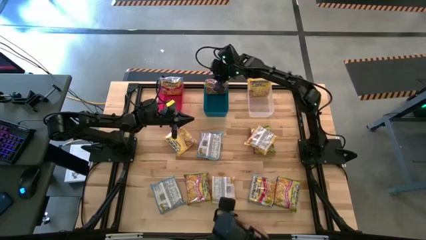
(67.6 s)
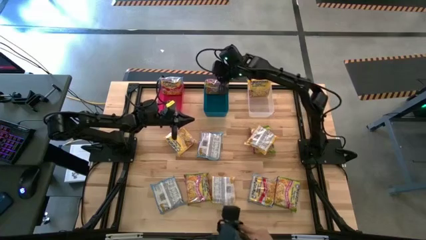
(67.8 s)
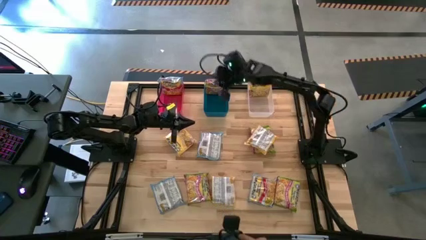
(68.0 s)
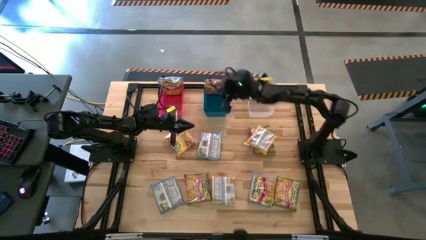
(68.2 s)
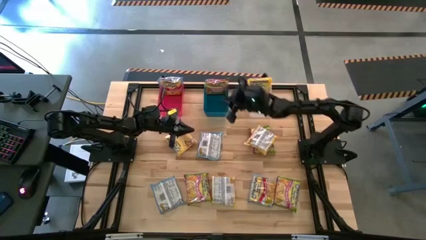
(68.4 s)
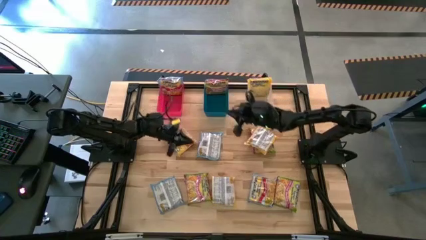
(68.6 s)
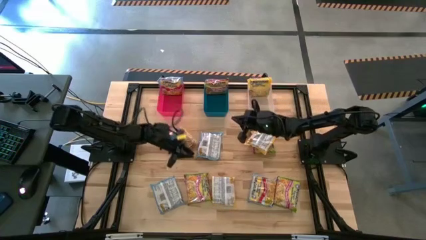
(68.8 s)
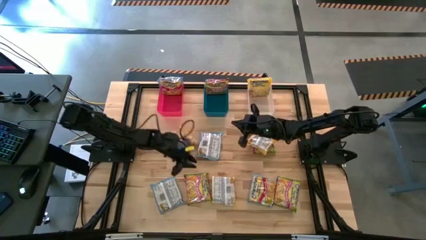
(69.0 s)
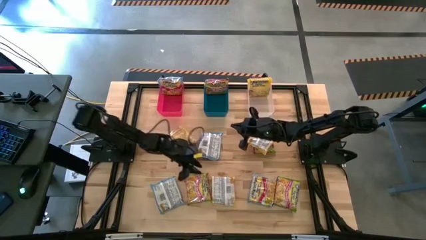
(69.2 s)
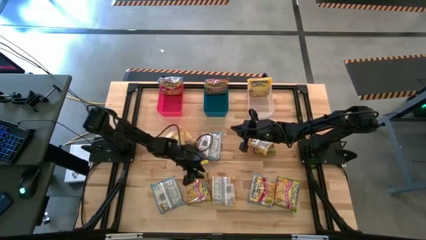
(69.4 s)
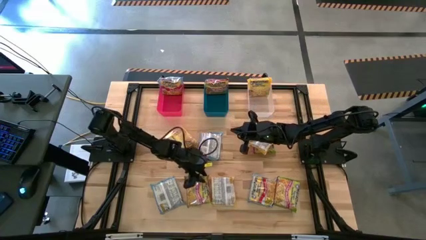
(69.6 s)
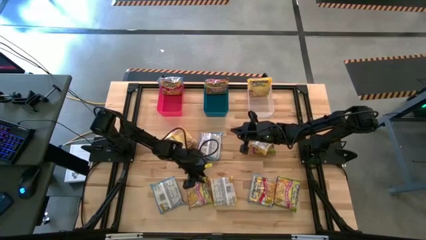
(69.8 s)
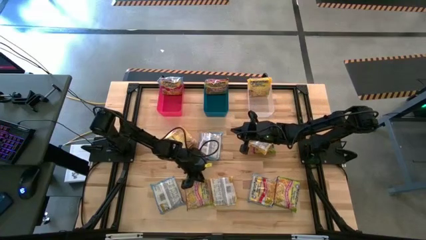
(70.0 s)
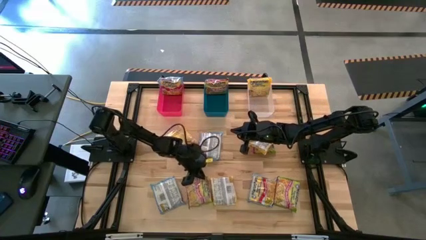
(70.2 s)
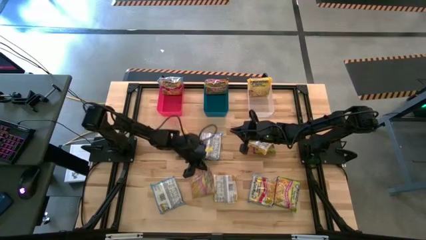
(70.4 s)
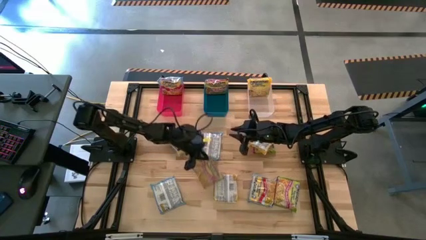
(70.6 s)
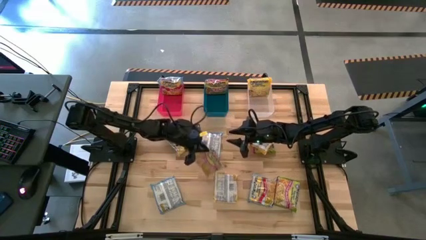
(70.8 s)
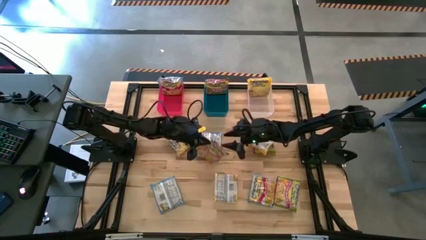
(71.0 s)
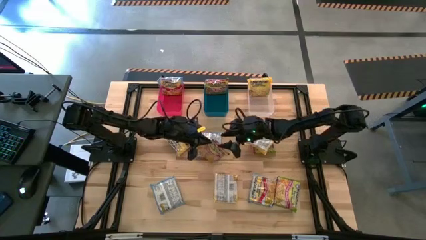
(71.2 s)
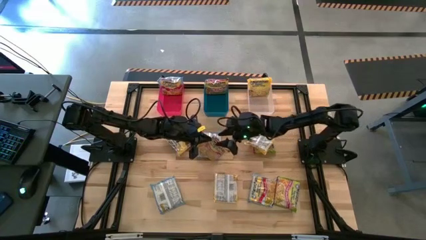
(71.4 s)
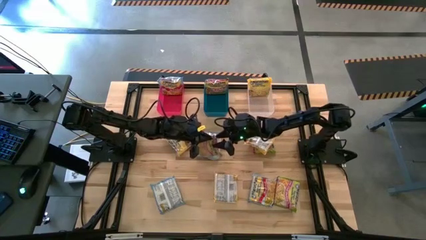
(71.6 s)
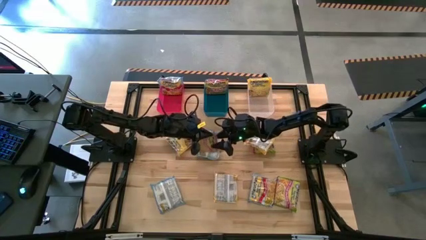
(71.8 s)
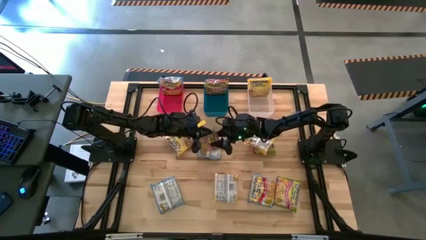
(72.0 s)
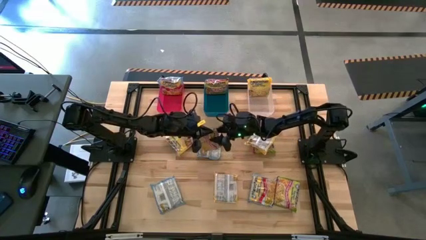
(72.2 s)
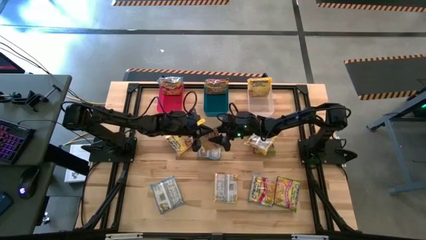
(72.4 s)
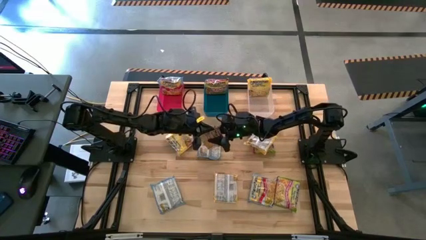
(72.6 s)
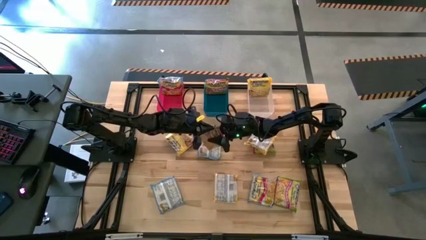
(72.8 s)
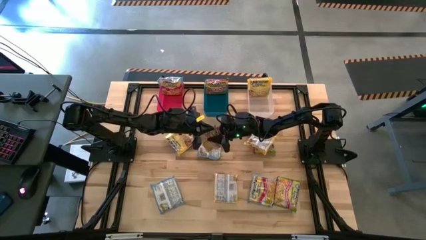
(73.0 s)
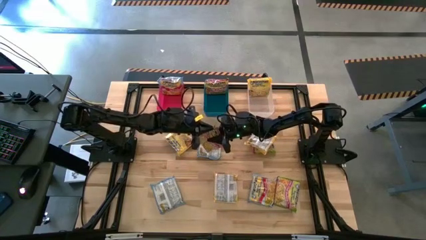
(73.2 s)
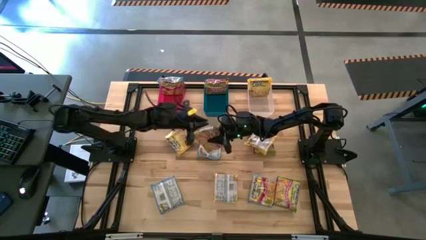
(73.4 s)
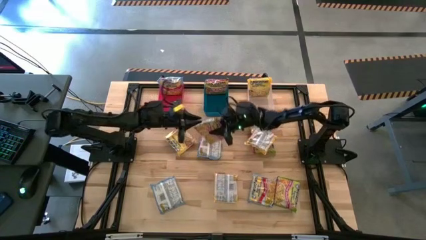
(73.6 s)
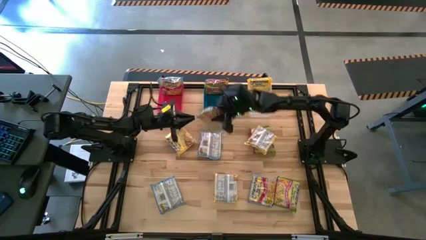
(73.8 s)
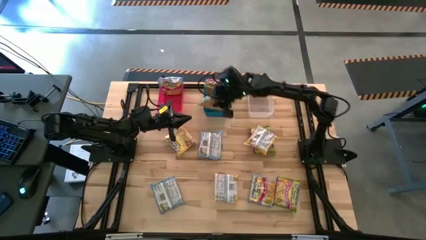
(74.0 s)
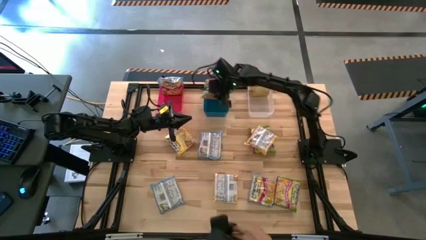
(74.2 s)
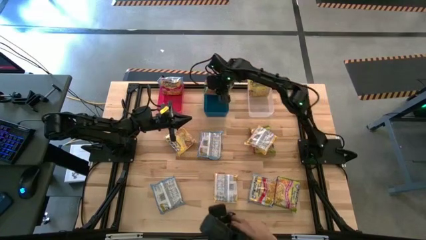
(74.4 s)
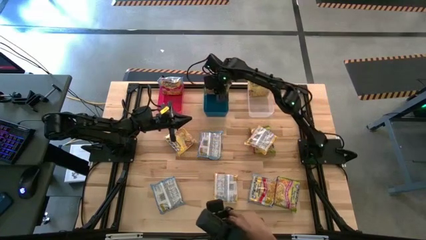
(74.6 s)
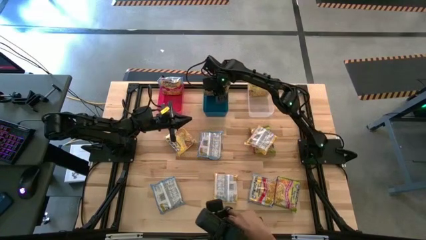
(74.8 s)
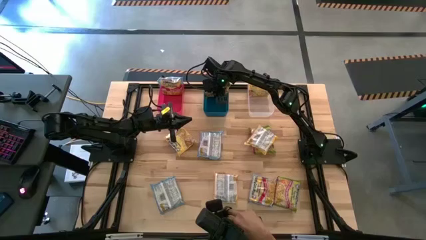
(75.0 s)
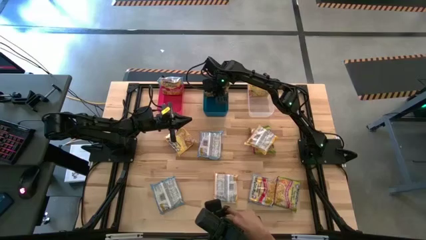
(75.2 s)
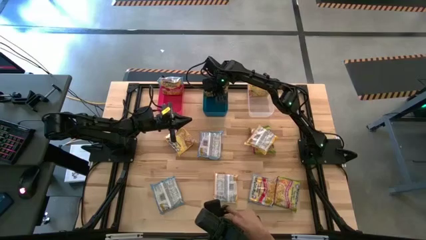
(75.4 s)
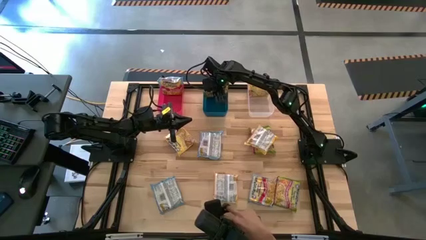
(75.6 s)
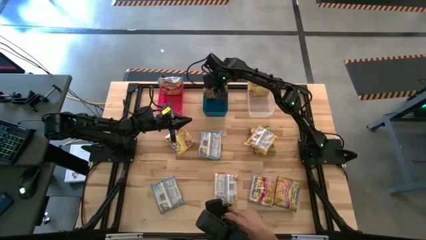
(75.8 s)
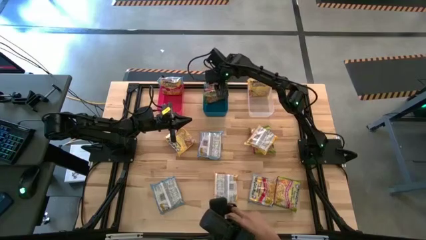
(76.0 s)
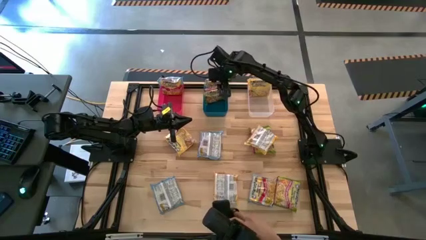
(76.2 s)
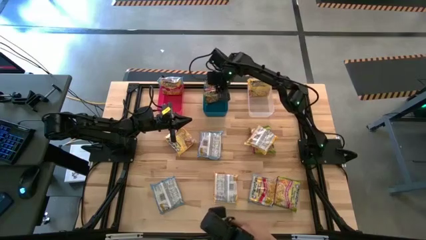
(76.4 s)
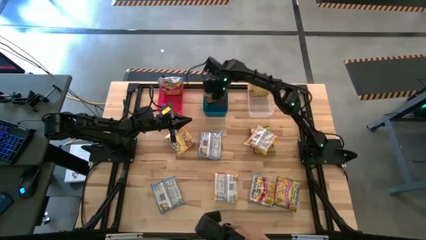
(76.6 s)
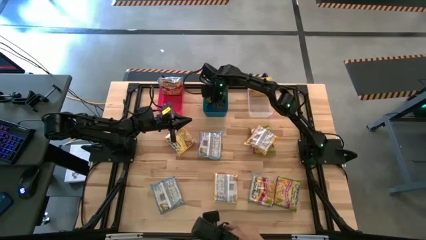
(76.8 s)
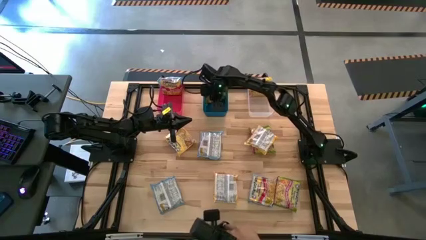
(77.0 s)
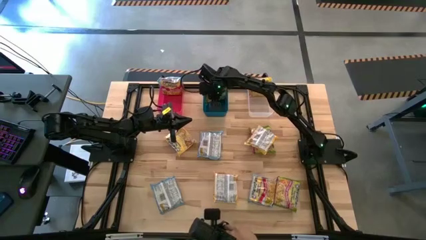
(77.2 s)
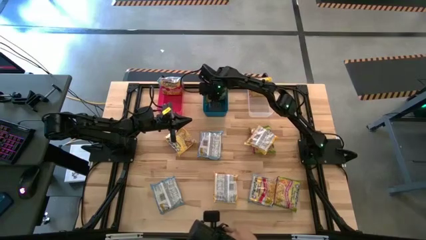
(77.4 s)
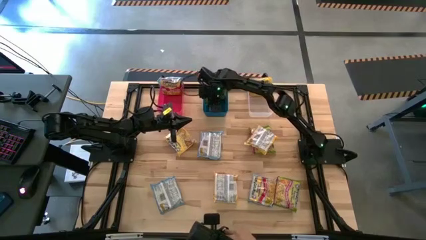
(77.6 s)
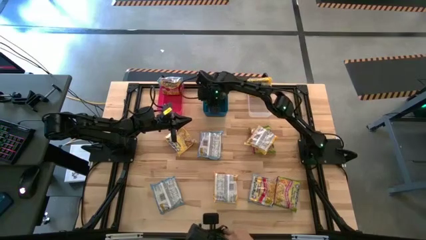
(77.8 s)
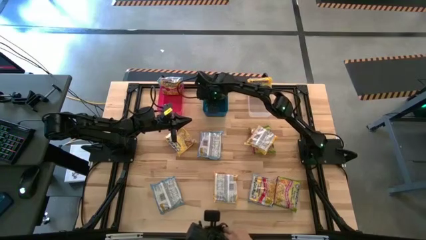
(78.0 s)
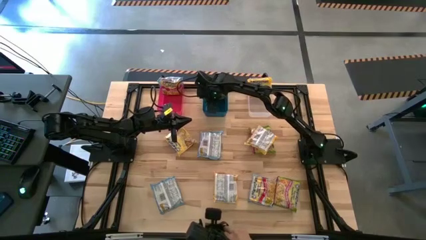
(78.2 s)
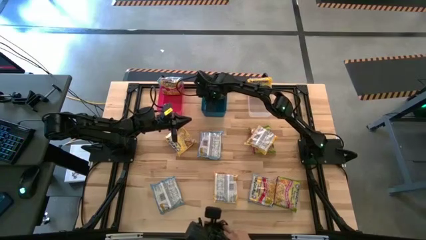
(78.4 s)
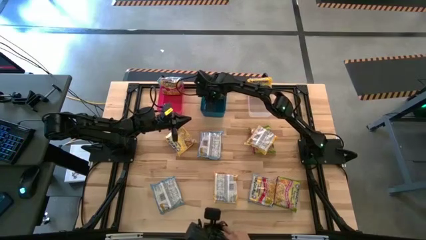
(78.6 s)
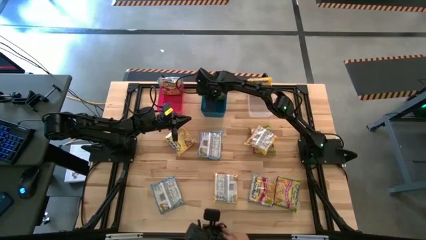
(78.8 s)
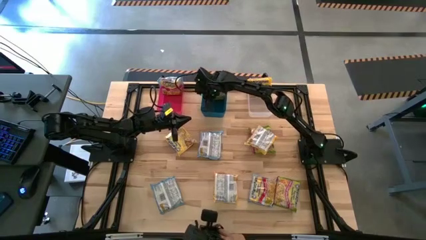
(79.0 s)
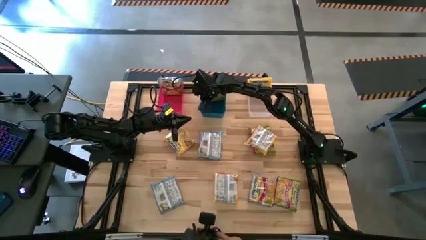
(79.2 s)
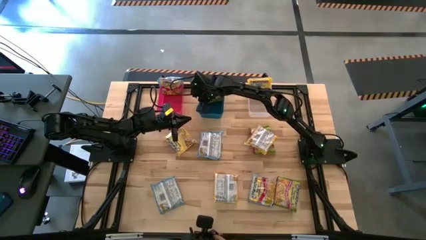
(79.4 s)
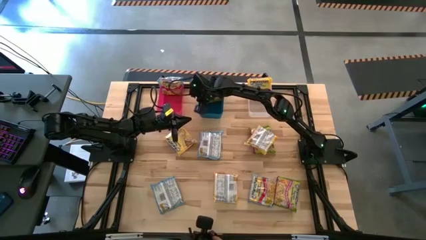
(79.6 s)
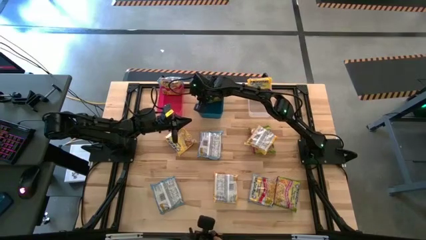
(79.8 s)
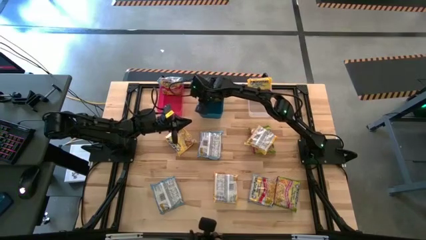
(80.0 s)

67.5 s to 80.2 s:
Task: Sort Maruchan noodles
Put the bottom left green noodle pack into the blue bin
